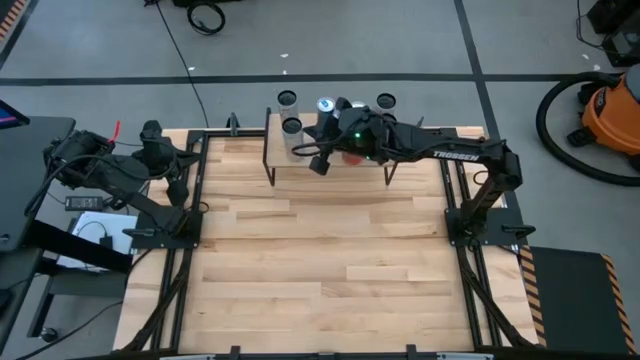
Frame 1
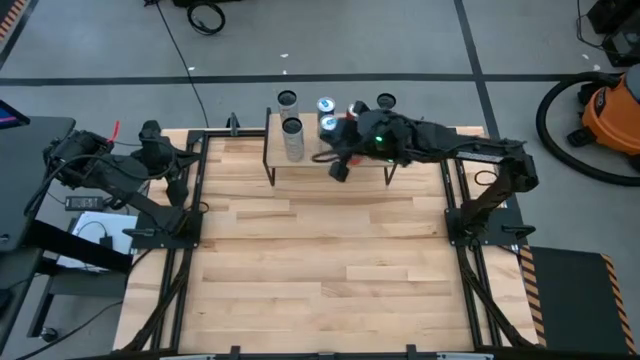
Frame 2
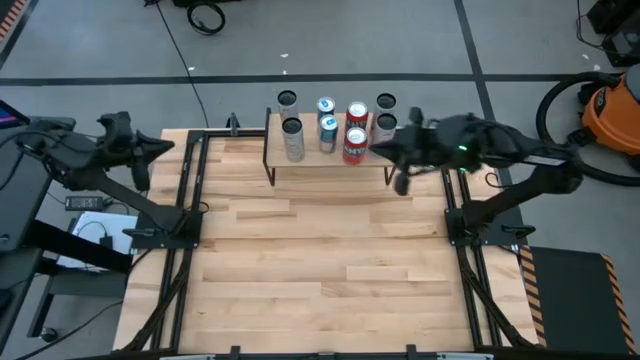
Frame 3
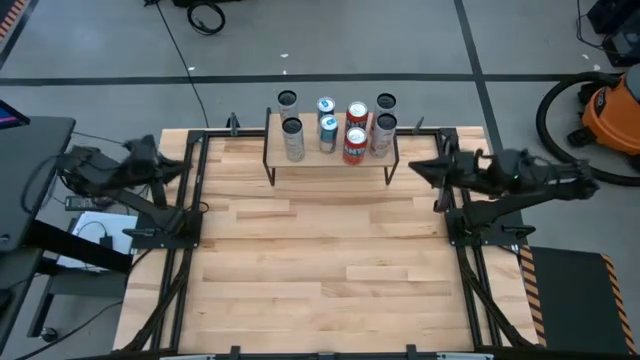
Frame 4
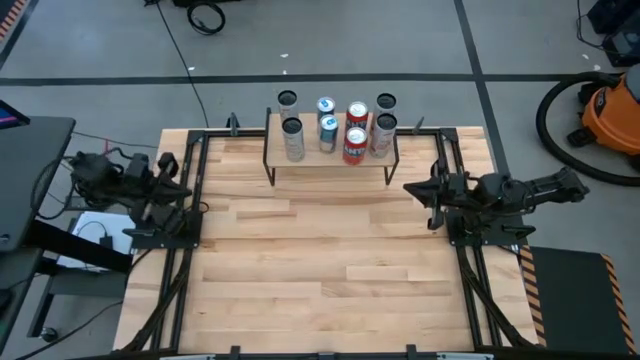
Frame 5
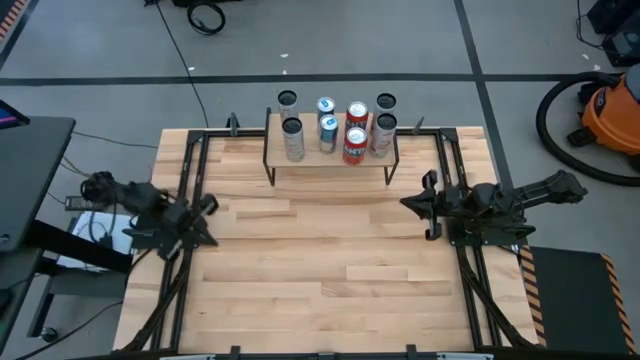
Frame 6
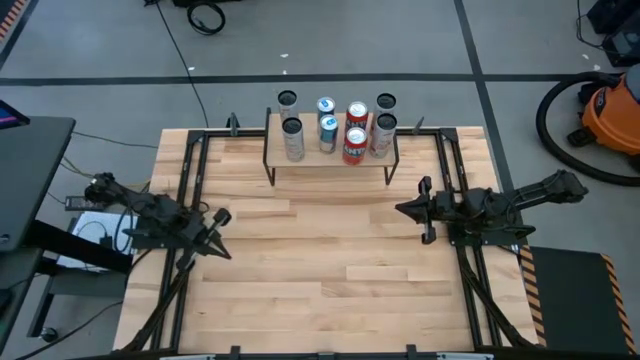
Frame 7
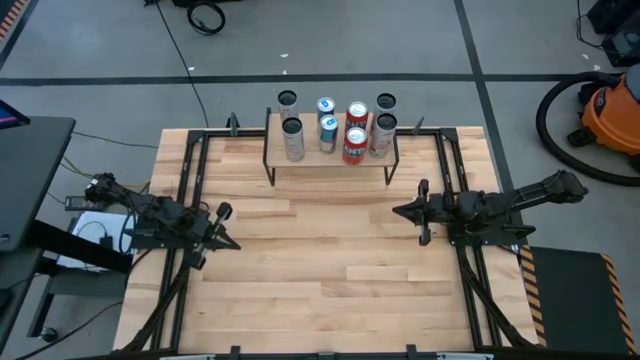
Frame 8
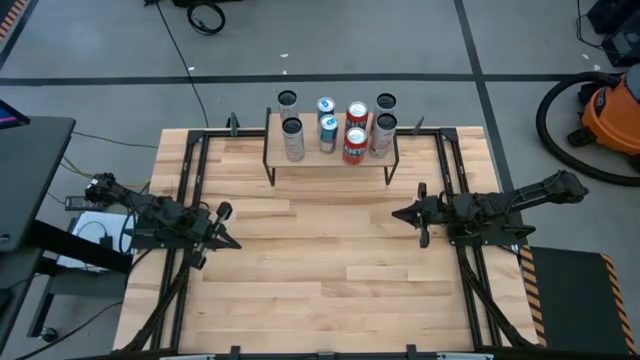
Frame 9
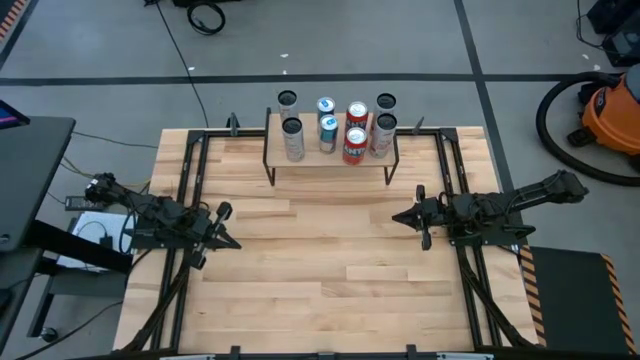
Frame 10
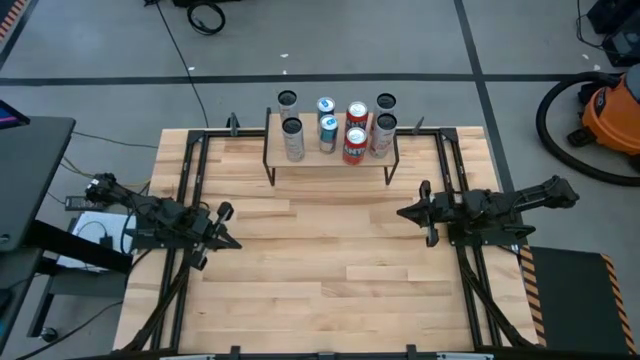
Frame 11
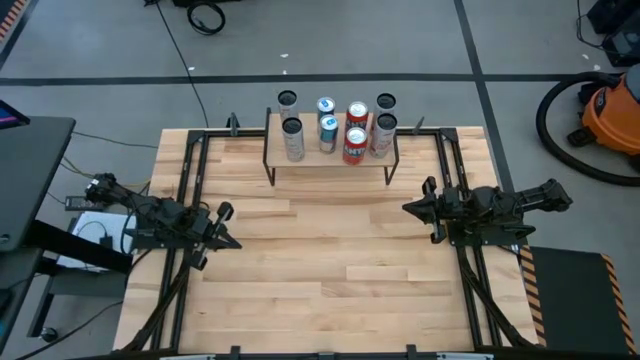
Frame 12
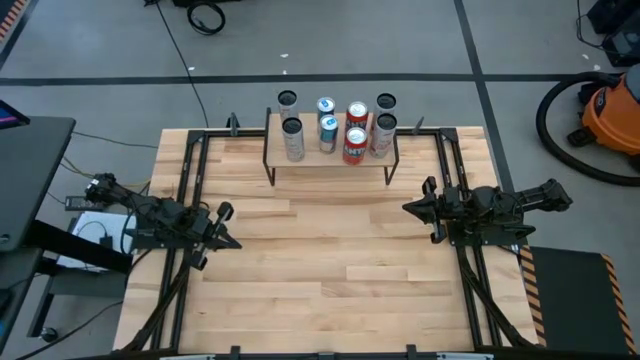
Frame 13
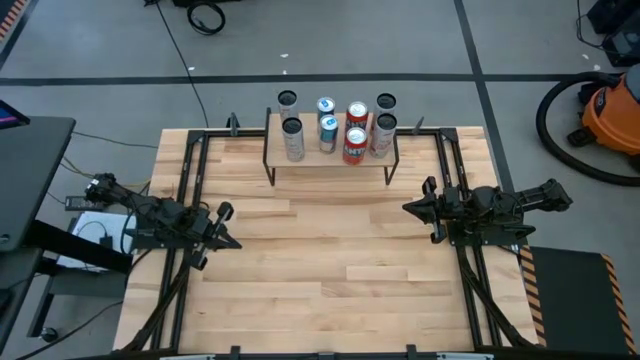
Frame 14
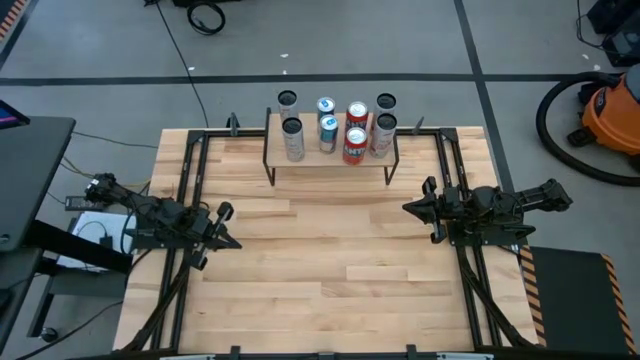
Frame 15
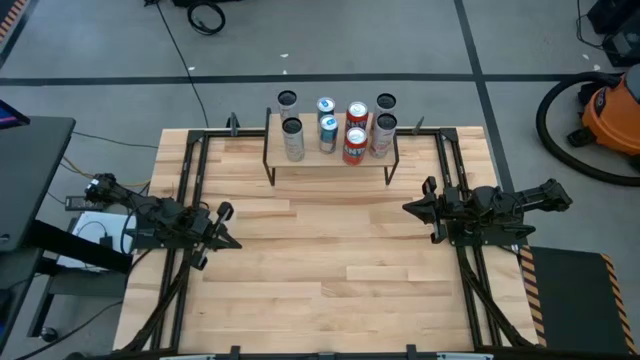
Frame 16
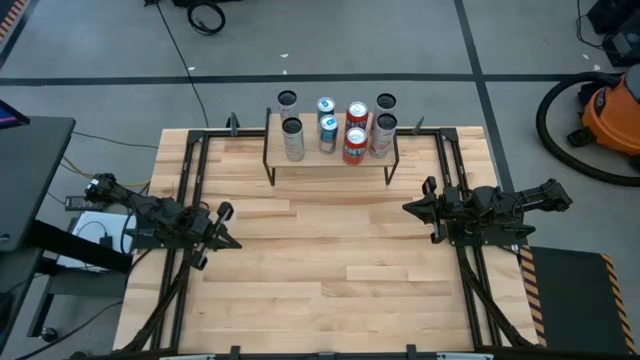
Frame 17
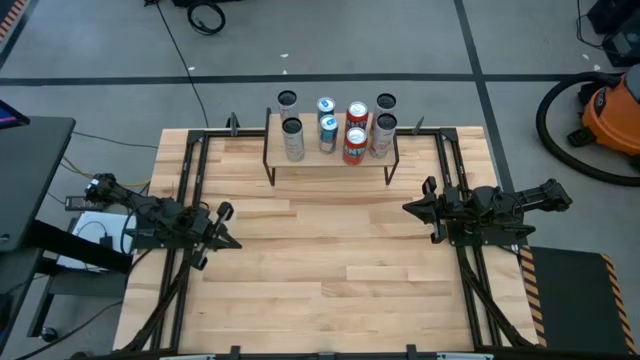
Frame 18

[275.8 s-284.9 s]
Task: Place canned beverage on shelf
Return to Home Position

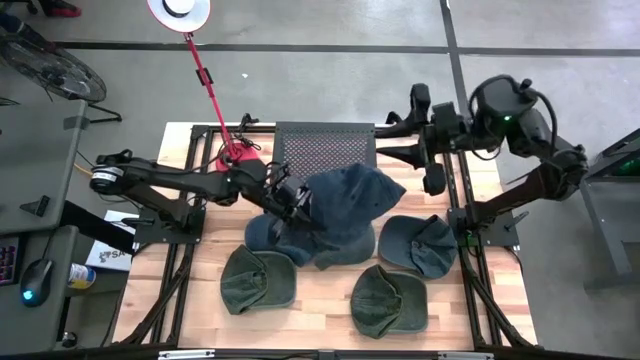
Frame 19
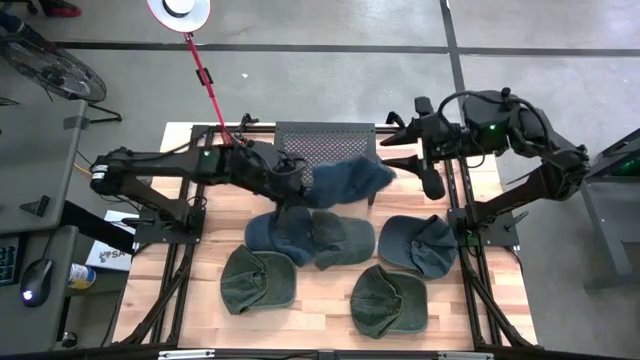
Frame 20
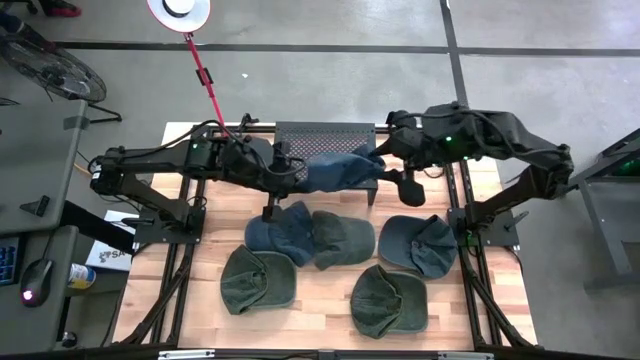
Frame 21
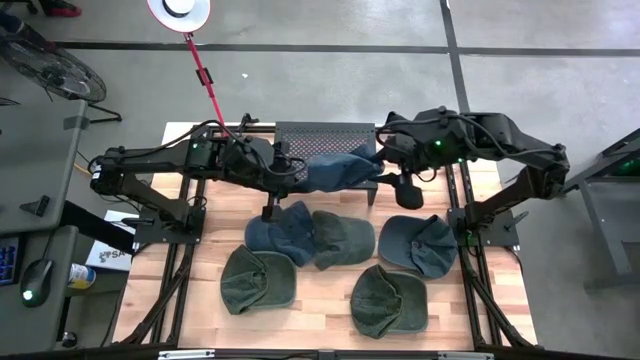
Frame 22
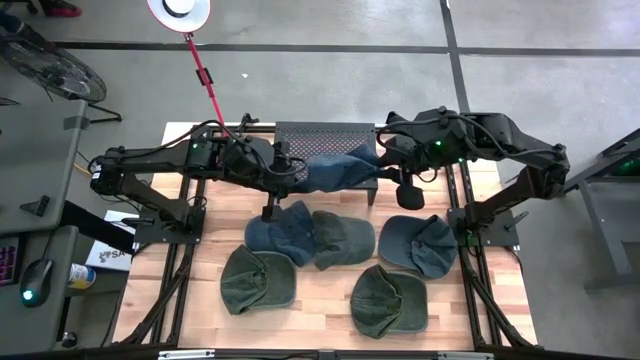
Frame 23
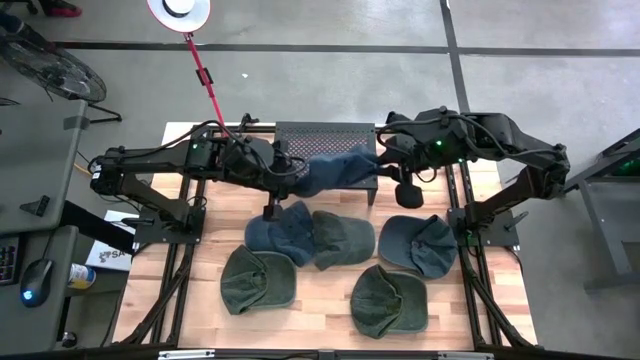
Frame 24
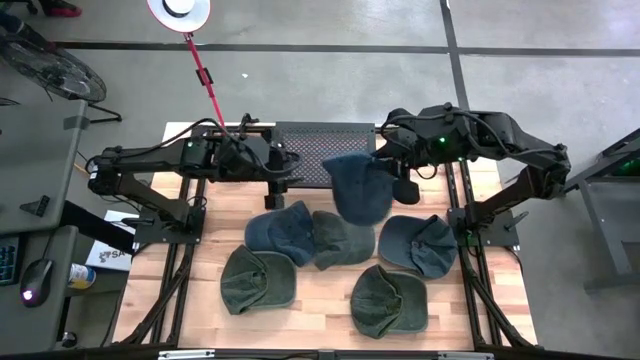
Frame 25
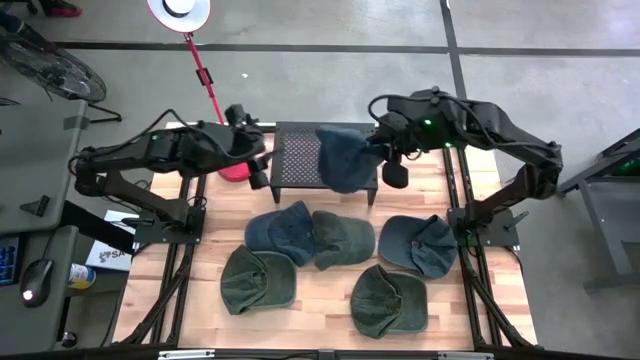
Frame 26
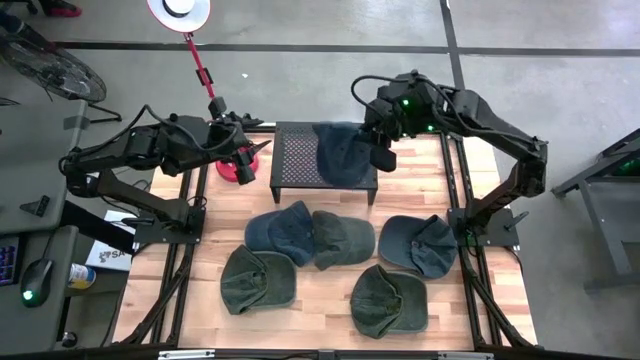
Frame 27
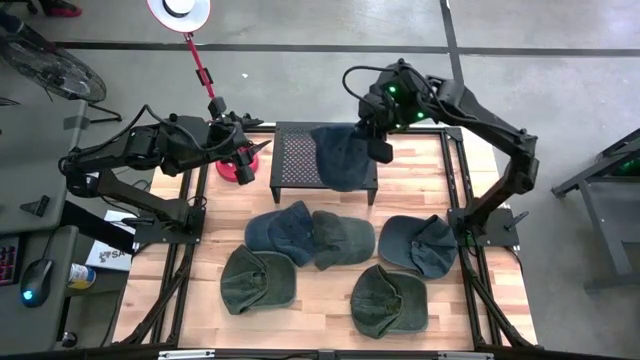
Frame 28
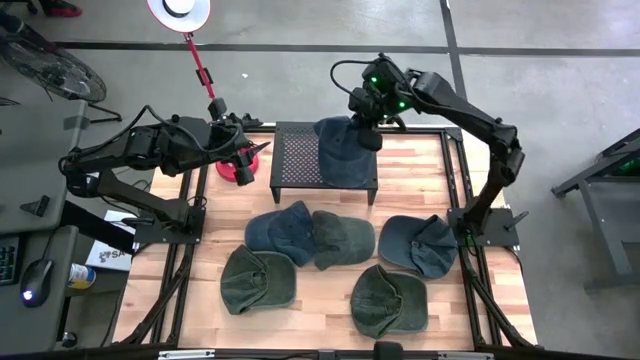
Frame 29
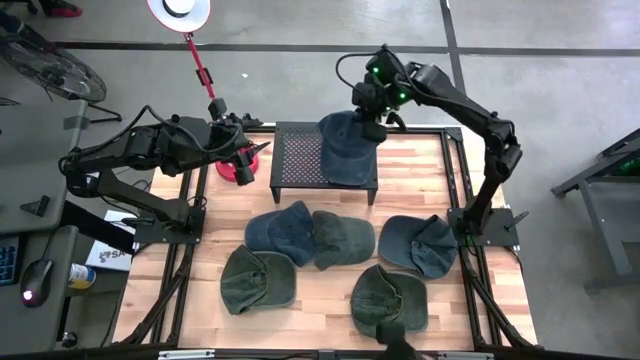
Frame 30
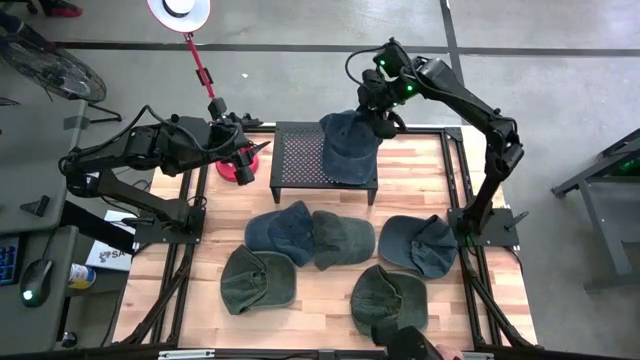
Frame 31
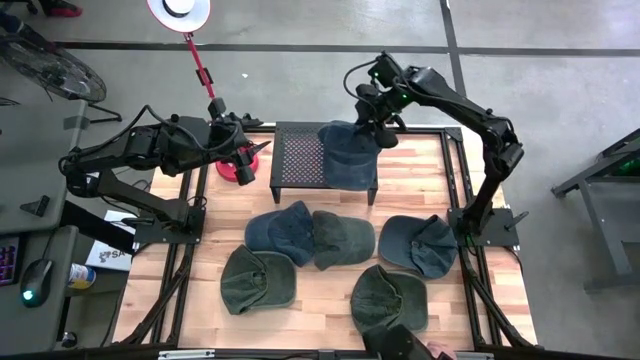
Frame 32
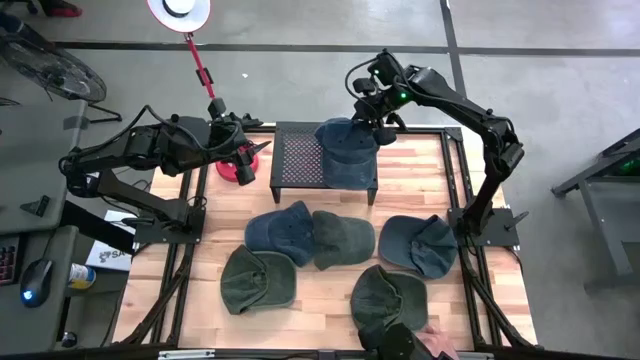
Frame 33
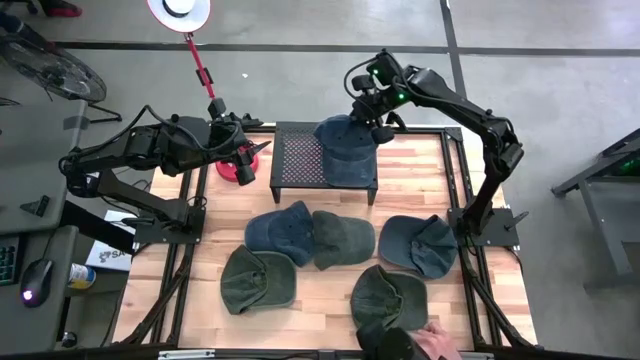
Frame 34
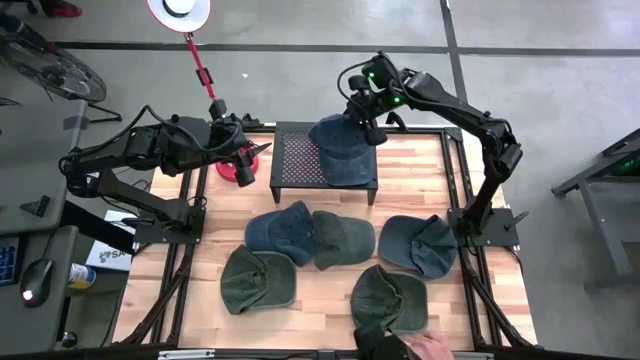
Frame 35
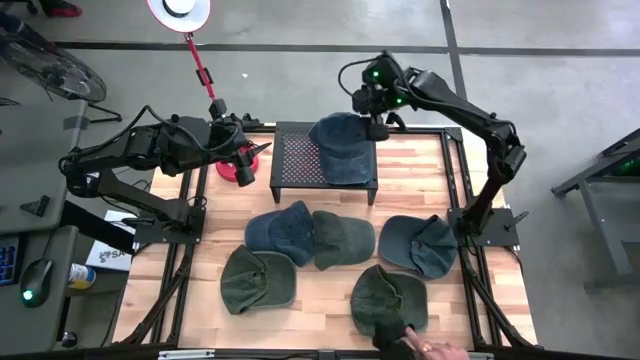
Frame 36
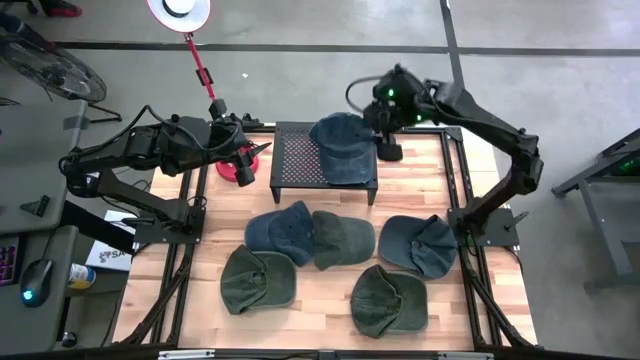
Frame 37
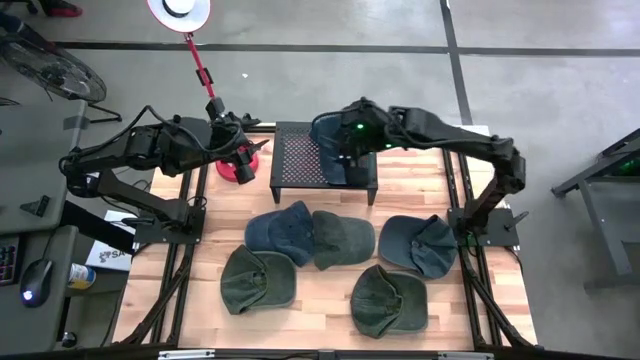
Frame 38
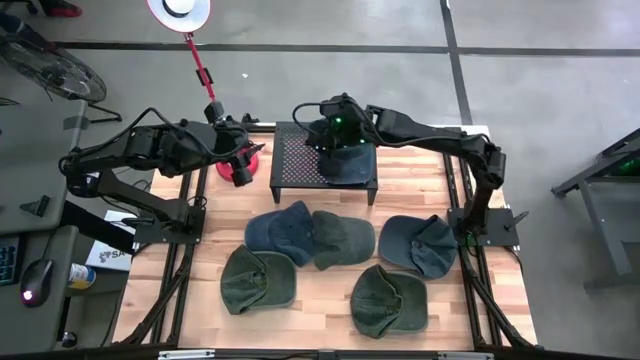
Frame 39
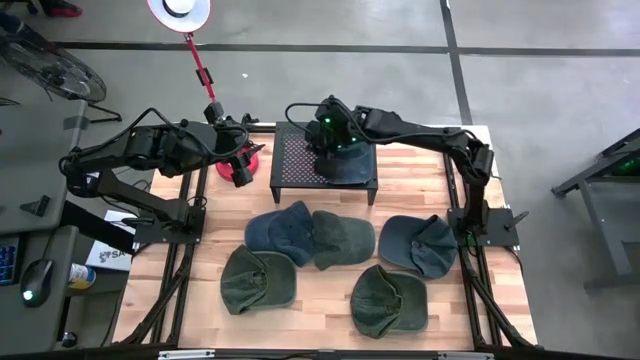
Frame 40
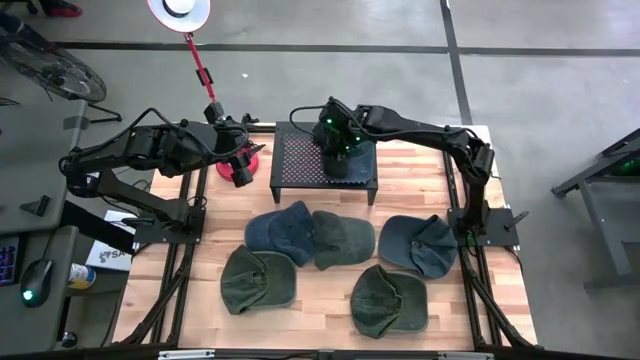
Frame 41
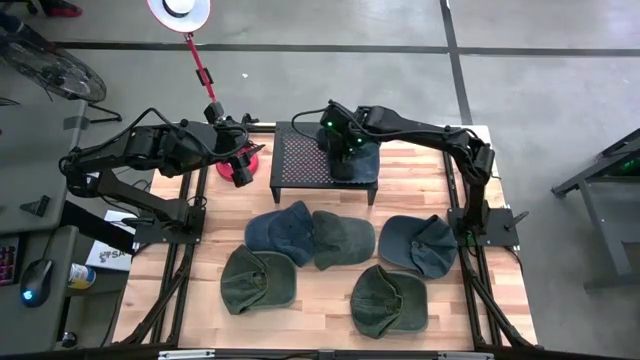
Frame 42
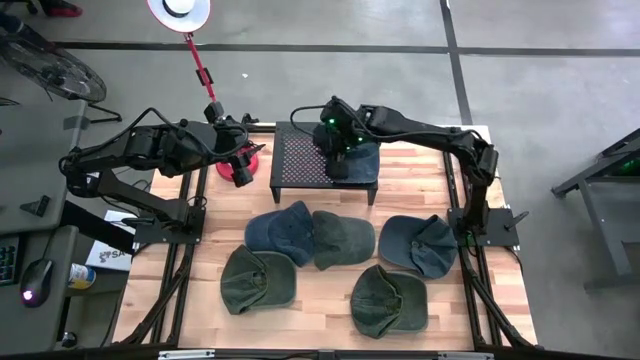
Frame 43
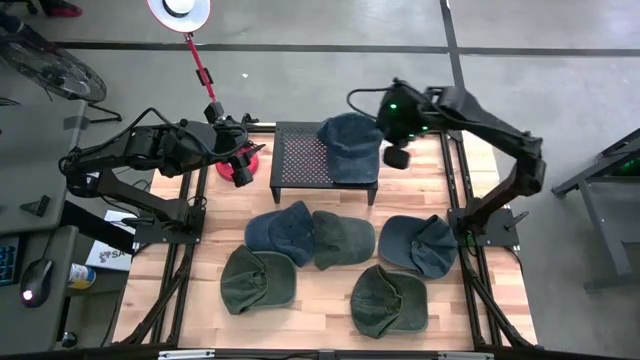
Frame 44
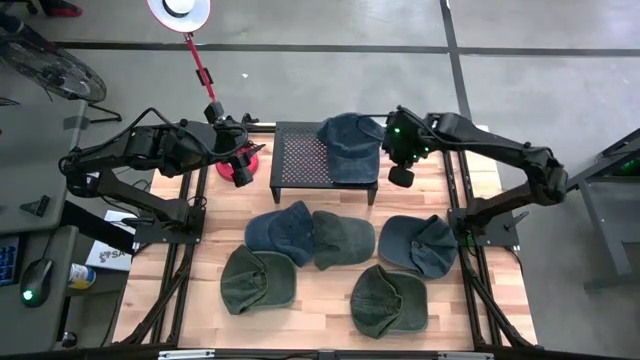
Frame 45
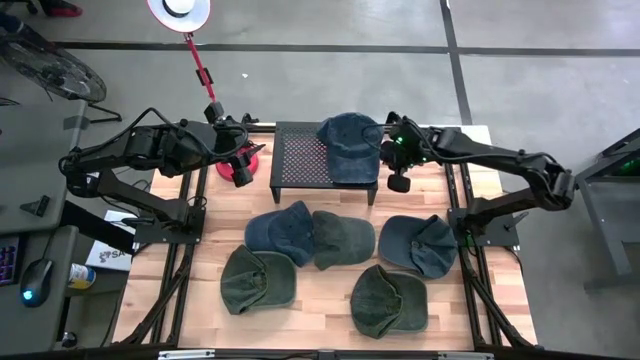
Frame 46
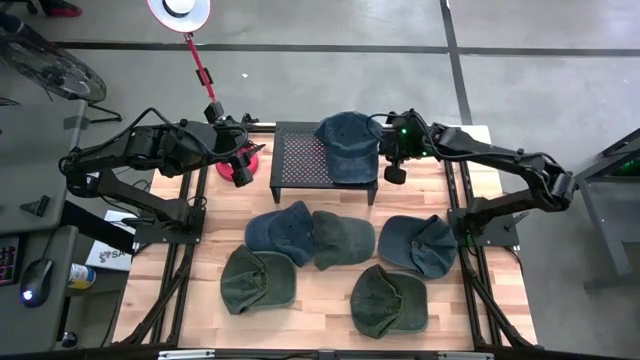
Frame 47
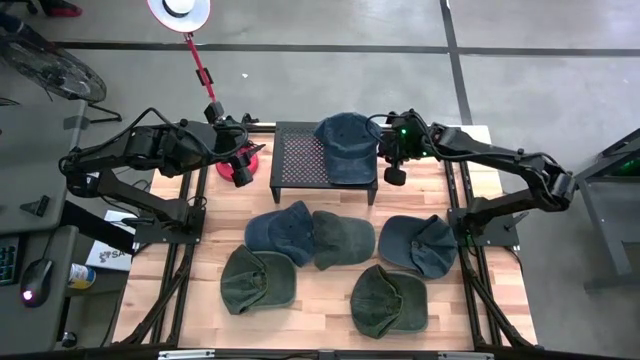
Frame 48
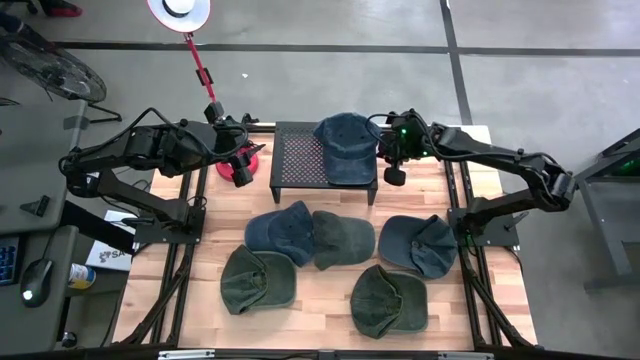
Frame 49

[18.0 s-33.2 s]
Task: Pick & Place hat
Put the bottom blue cap to the right on the shelf
